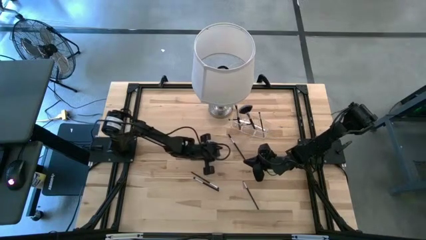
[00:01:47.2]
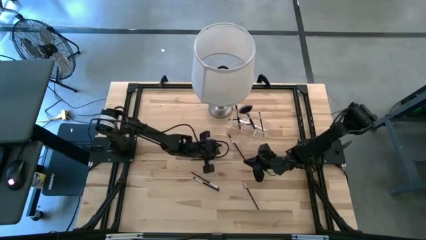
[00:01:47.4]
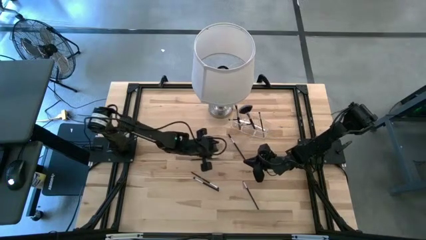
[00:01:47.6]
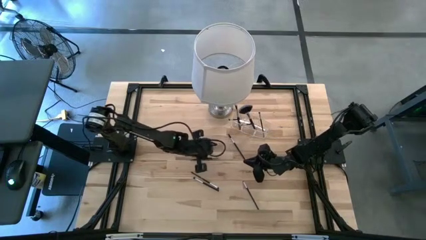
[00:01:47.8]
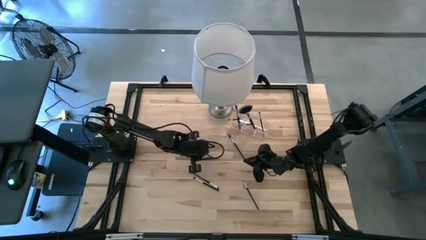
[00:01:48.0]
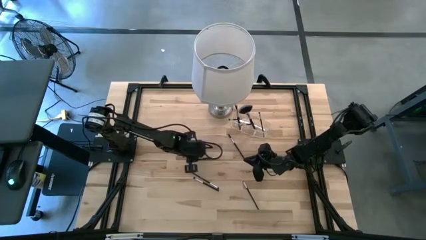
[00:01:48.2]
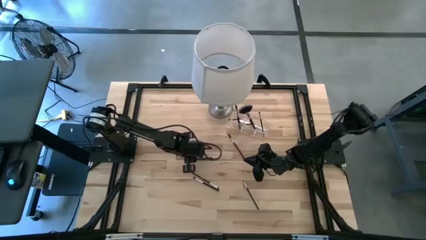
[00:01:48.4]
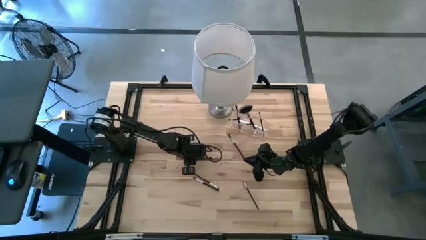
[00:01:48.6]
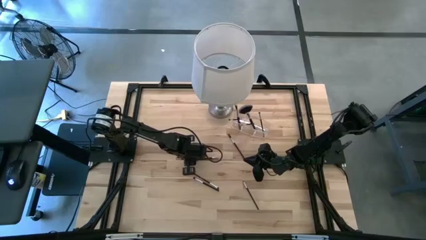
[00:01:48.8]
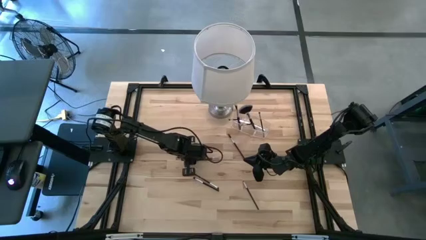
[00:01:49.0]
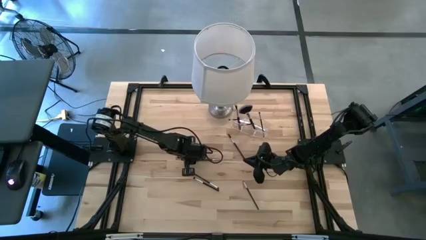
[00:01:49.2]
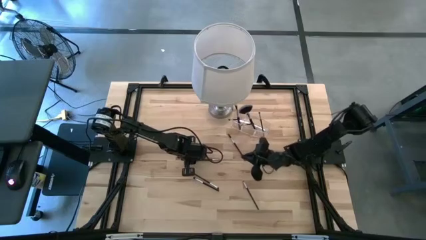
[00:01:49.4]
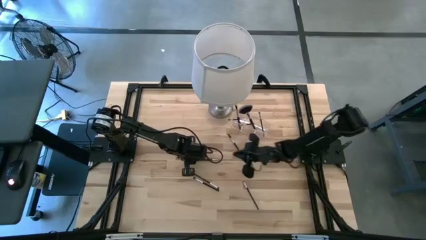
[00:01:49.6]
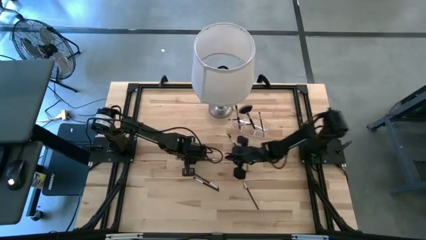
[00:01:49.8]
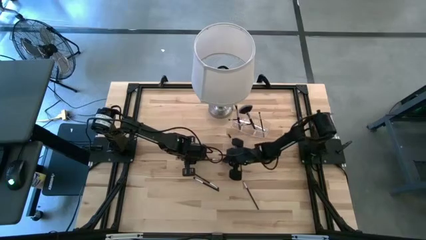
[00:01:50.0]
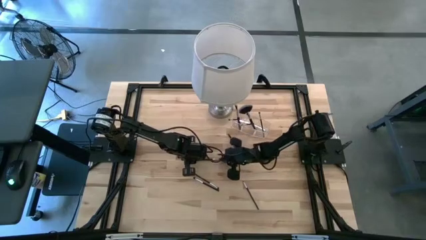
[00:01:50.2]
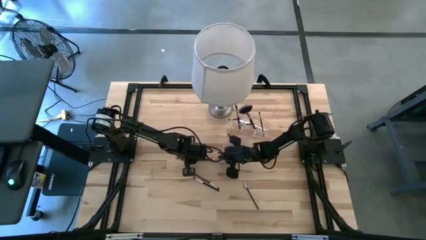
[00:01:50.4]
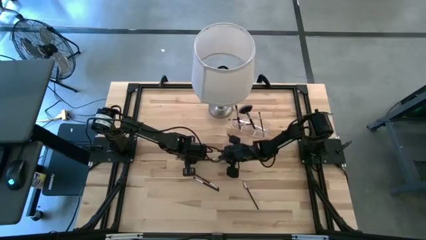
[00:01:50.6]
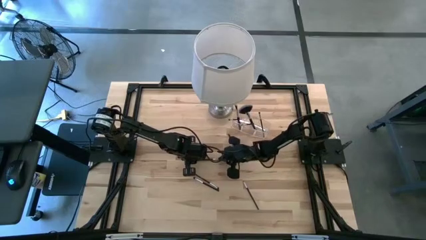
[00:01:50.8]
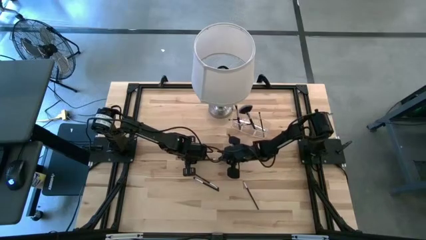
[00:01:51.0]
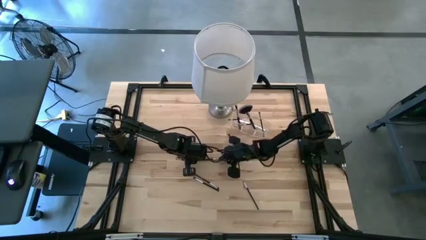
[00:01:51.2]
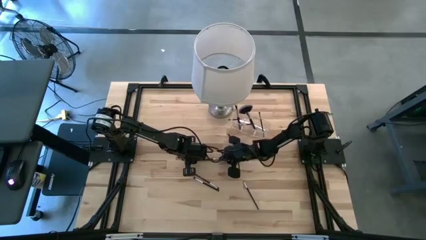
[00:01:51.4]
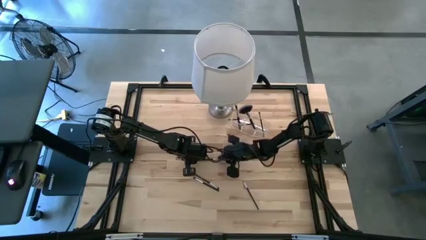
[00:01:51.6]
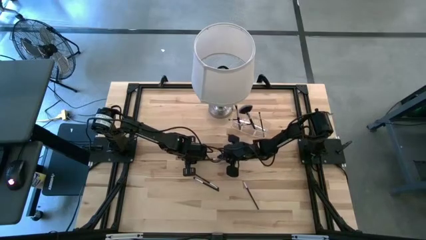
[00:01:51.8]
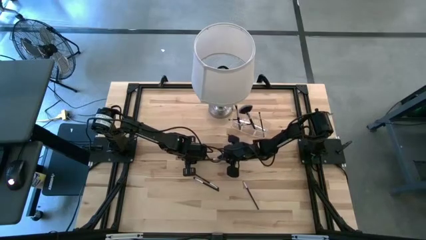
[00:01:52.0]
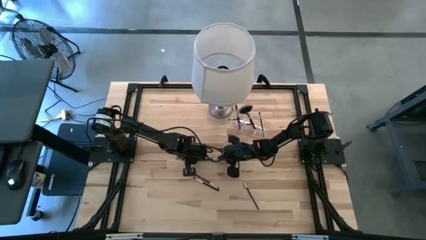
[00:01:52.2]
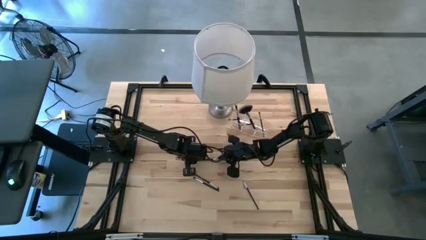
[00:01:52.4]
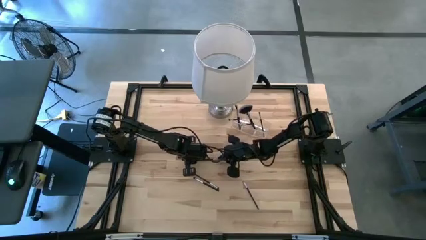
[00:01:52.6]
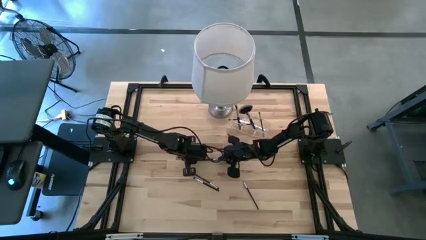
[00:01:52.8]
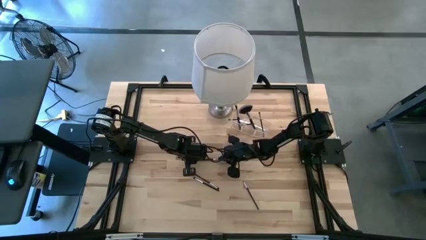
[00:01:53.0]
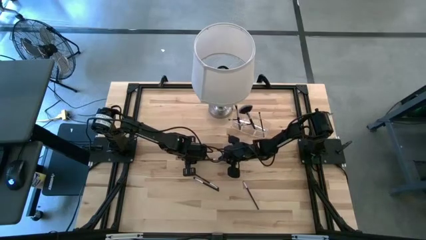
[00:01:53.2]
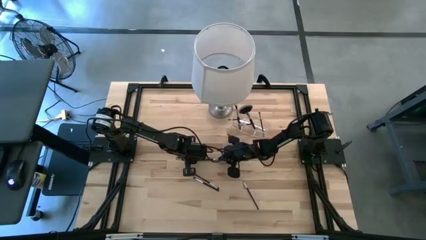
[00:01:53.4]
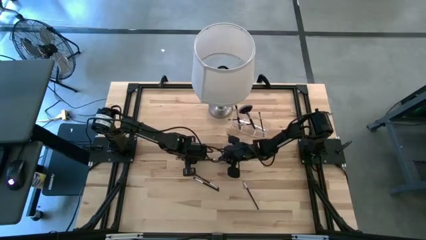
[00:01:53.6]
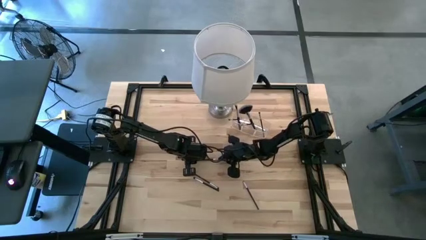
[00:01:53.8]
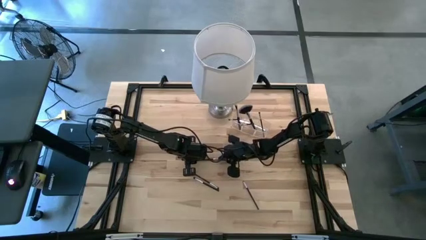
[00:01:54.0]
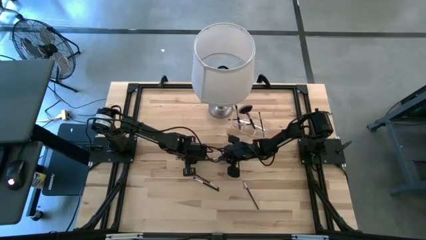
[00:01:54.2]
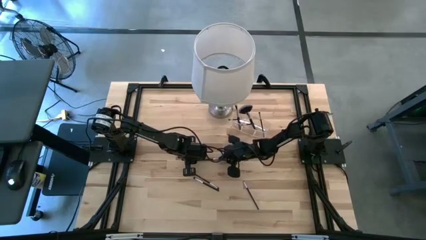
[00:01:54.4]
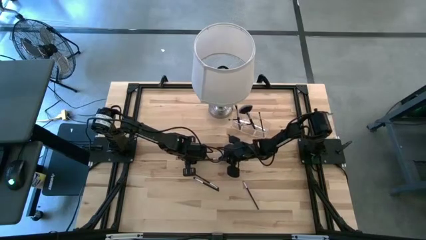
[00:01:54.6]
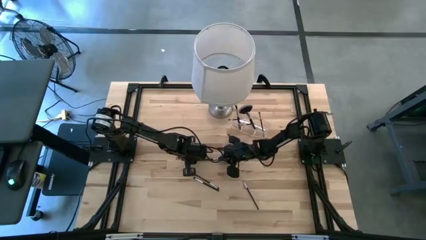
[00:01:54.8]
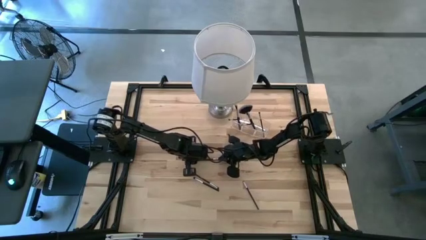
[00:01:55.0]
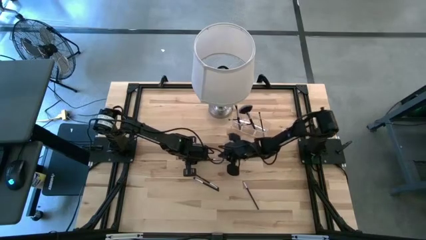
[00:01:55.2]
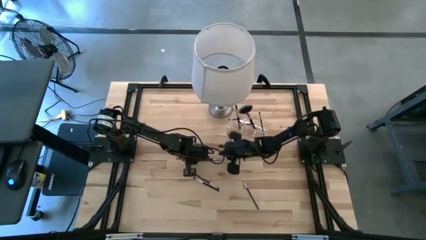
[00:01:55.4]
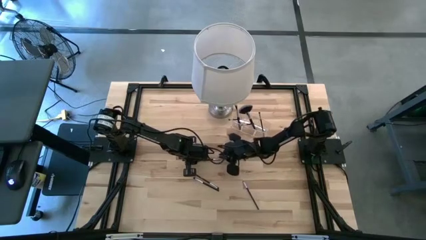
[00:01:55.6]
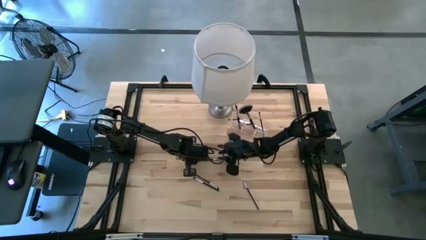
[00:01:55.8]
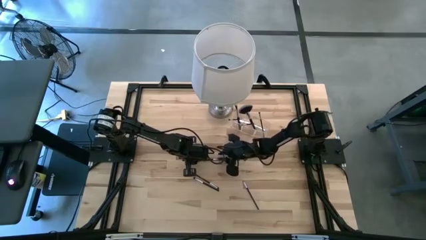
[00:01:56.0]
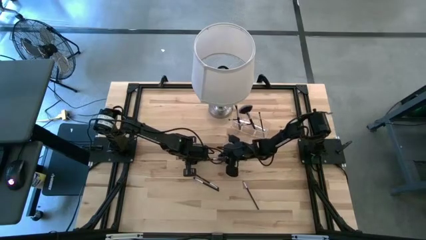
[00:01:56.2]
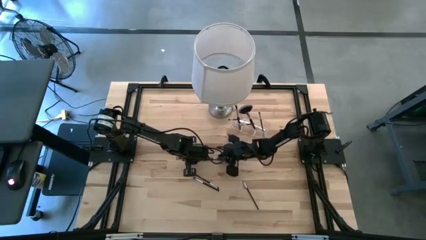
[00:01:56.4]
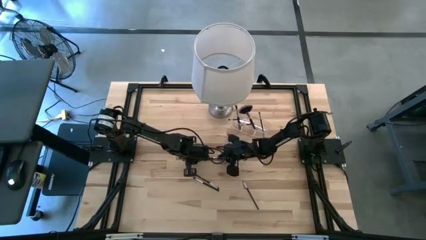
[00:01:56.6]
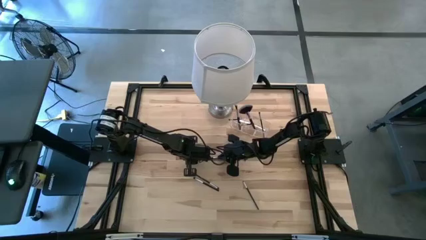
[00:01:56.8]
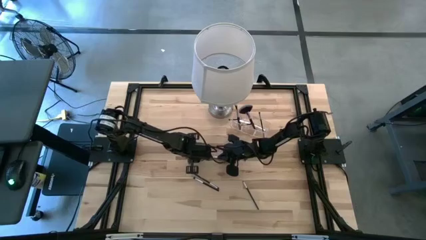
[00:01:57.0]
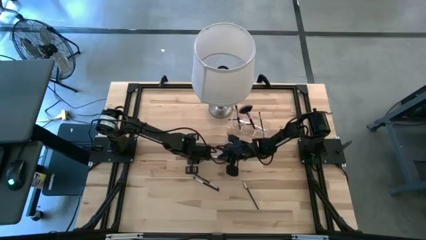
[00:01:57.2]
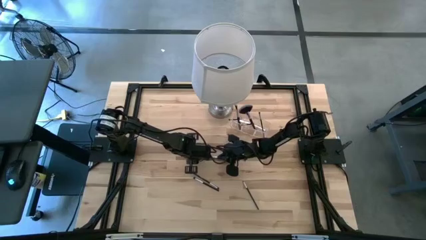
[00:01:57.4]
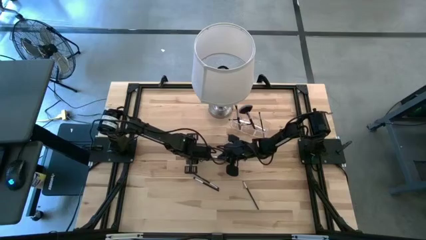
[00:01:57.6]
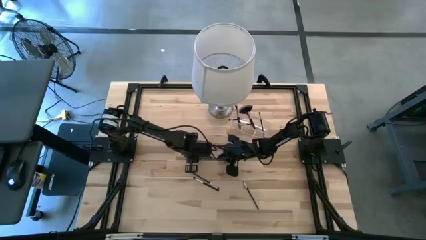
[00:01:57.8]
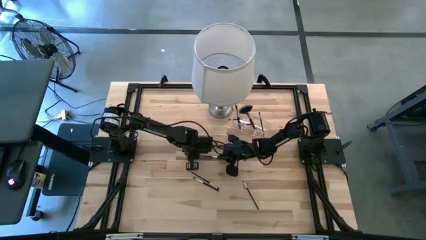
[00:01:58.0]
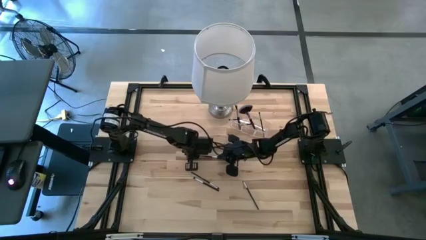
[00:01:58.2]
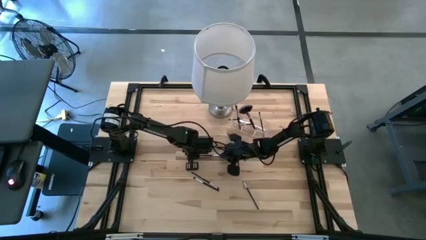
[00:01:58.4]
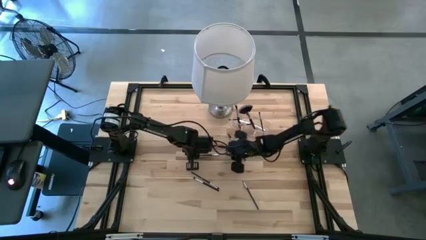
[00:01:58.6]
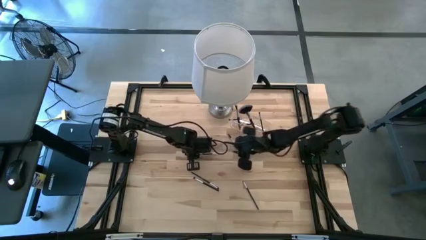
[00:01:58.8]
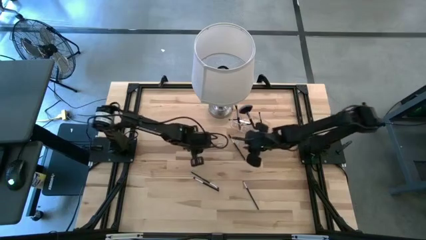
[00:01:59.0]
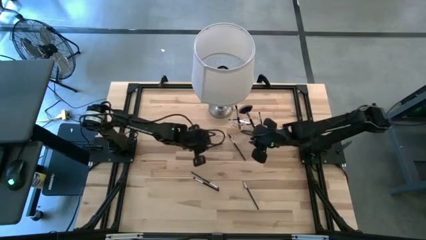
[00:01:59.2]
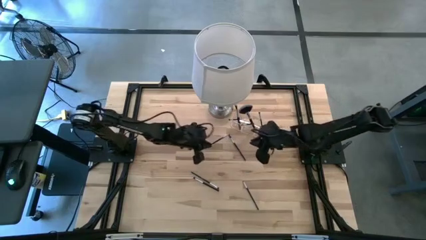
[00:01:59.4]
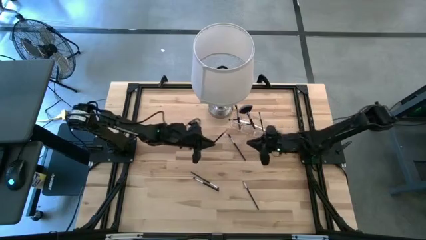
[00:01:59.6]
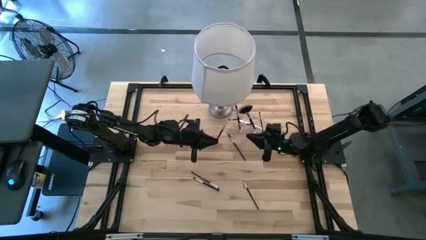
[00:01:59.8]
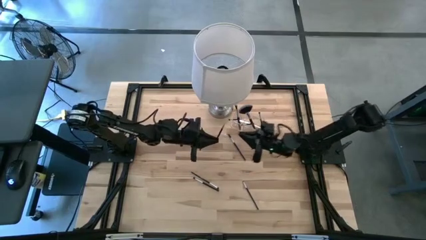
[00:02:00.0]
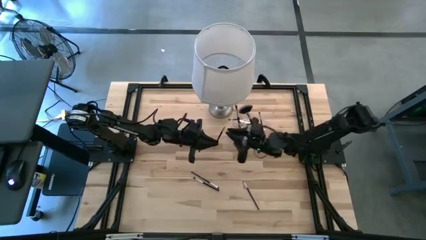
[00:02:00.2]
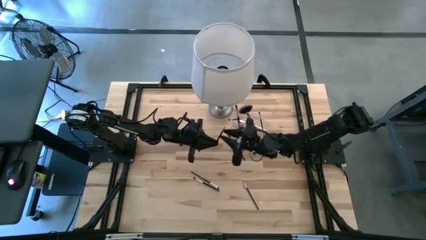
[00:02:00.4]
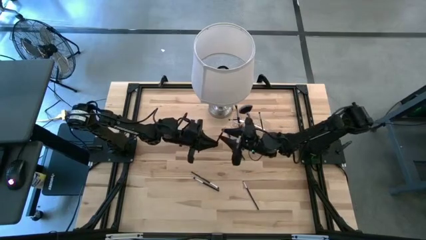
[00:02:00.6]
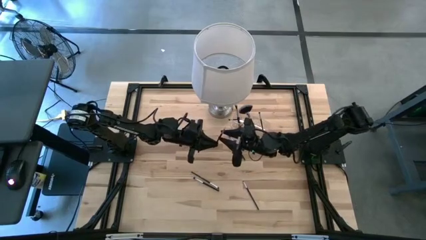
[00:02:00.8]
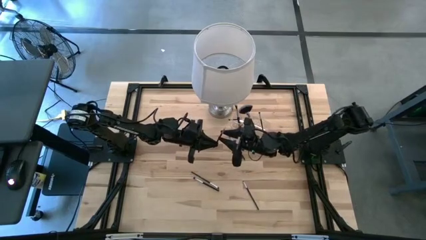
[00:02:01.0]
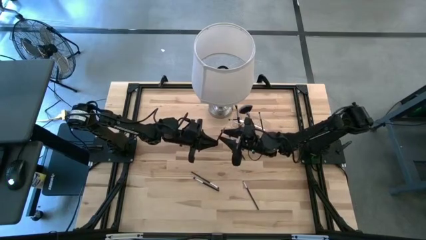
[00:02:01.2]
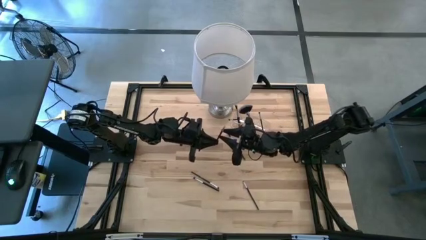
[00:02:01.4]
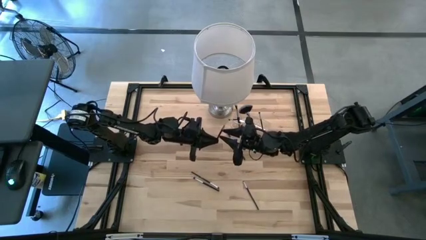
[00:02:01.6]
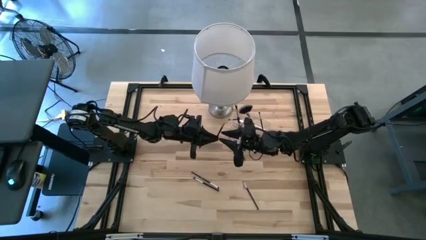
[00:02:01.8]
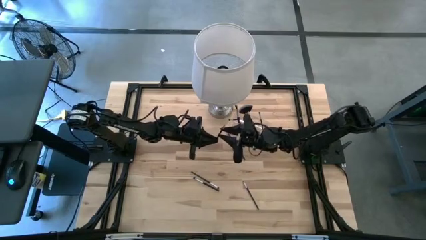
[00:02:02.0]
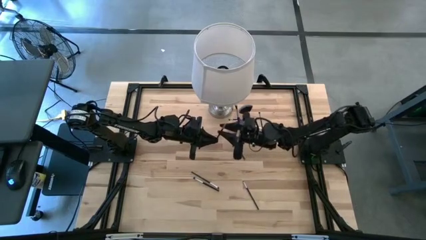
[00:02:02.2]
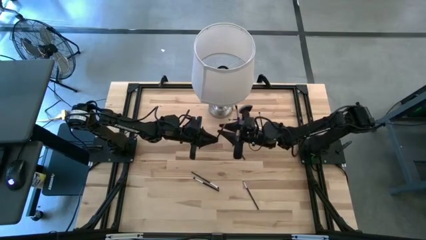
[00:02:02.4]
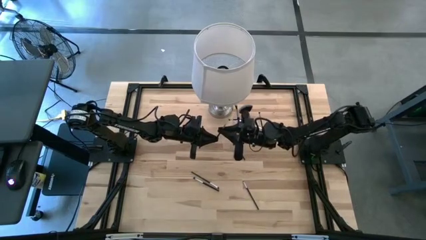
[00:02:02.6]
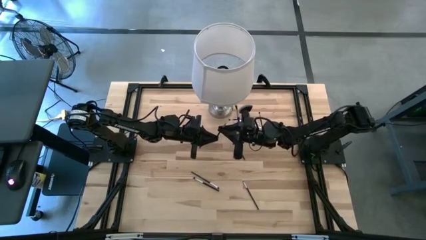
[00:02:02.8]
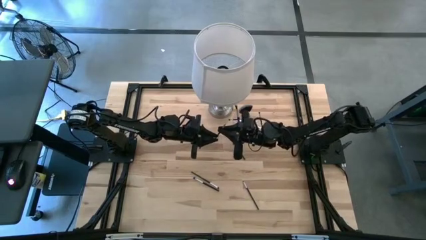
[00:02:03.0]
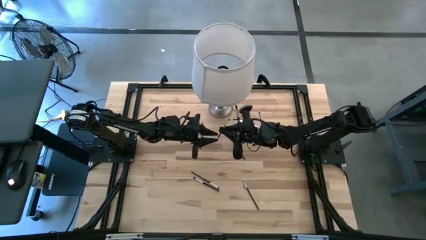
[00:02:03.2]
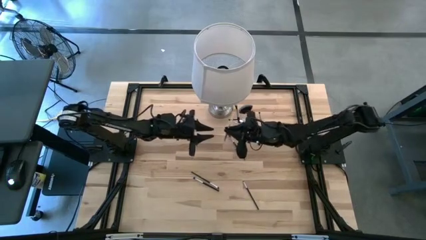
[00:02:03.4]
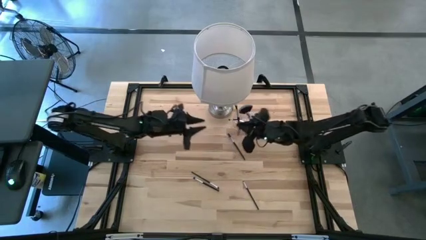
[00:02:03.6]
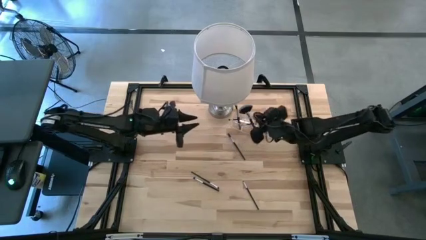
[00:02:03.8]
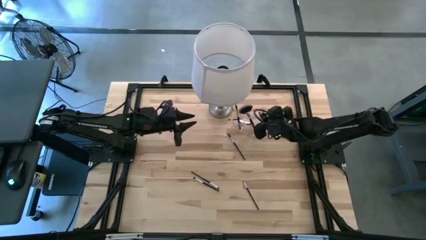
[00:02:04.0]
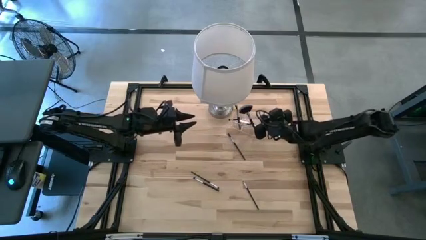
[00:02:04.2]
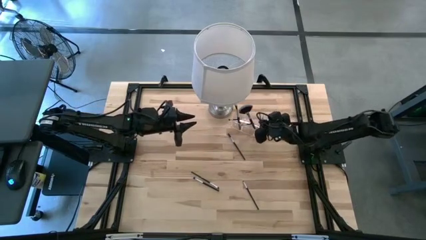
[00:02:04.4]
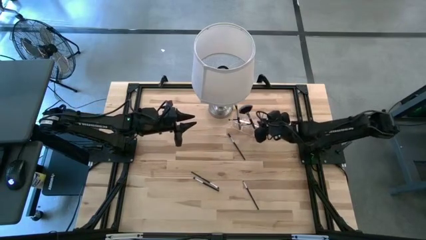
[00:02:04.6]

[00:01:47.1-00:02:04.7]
Task: Put items in baskets/containers
Put the liner brush into the transparent organizer
